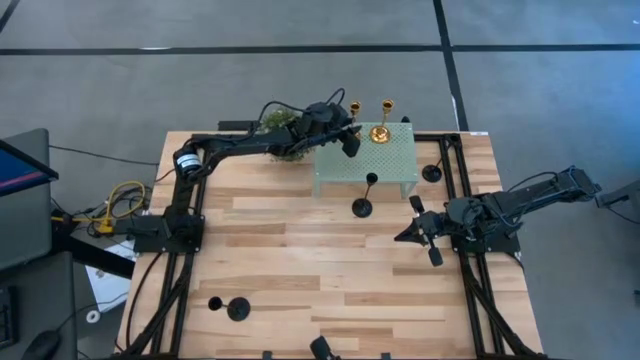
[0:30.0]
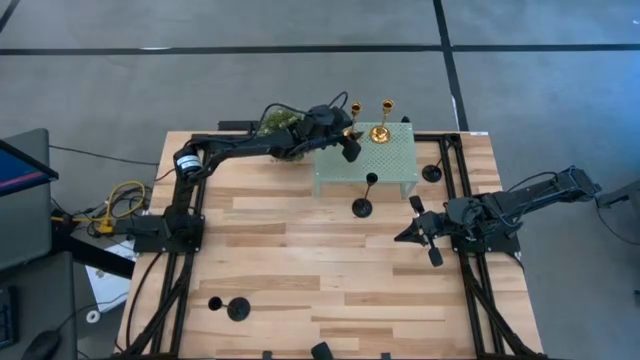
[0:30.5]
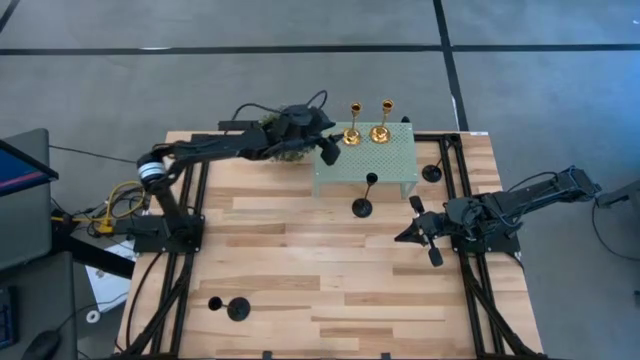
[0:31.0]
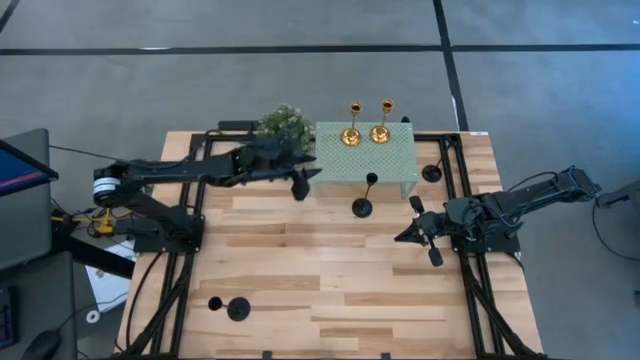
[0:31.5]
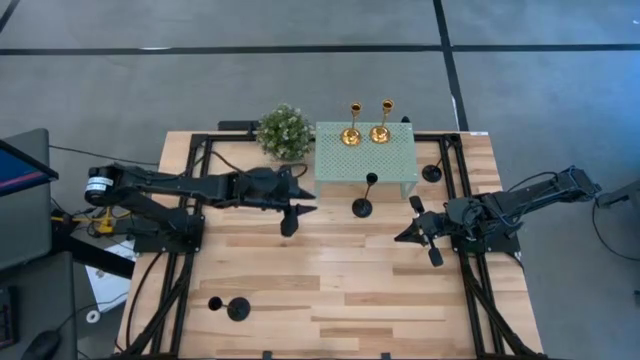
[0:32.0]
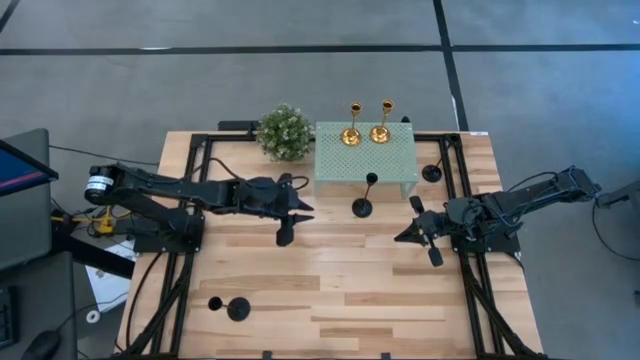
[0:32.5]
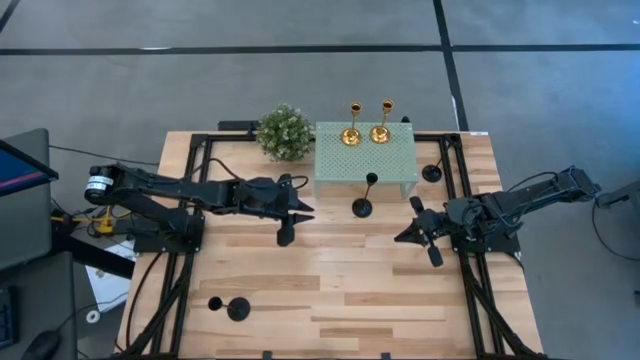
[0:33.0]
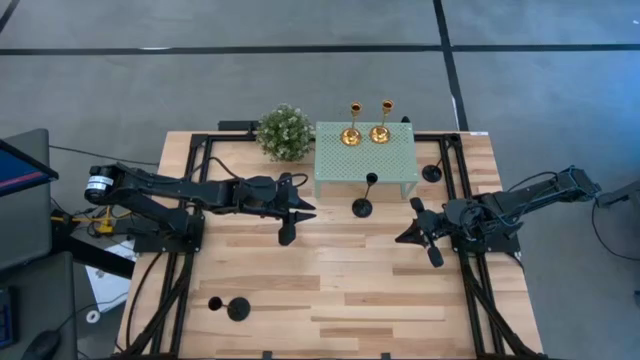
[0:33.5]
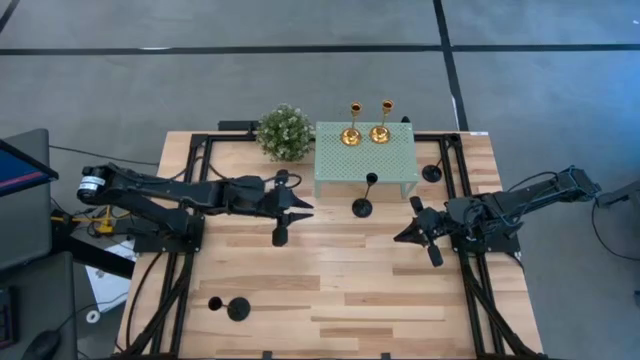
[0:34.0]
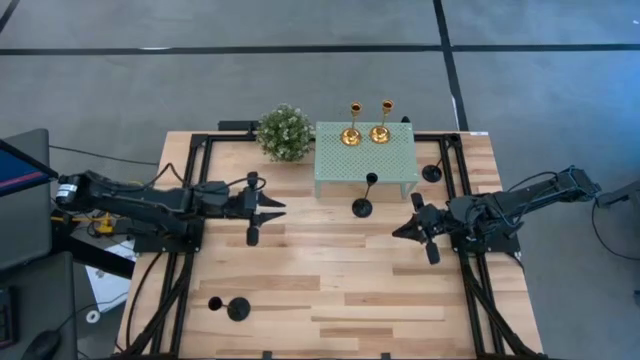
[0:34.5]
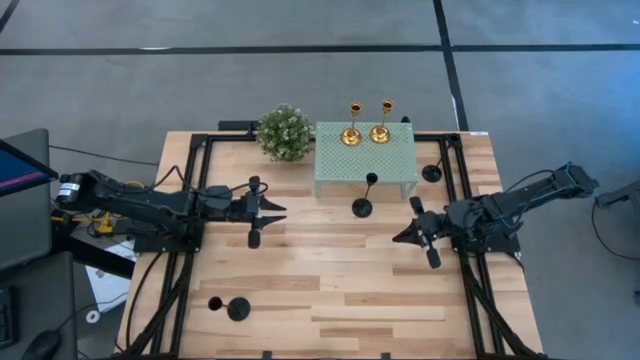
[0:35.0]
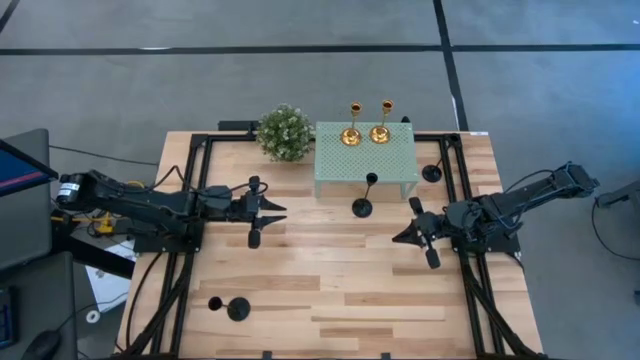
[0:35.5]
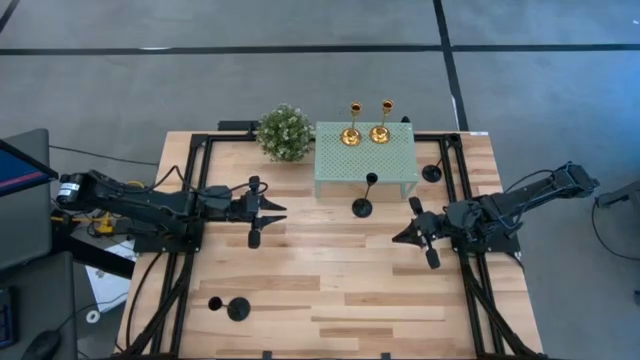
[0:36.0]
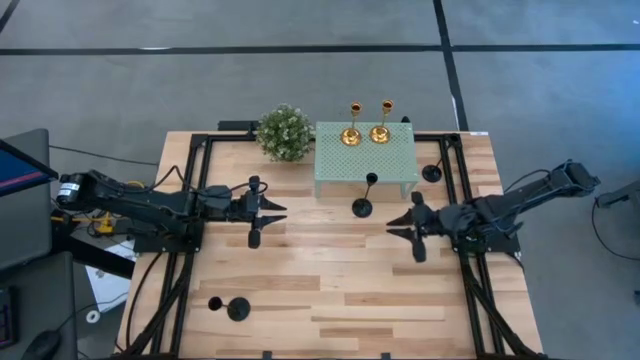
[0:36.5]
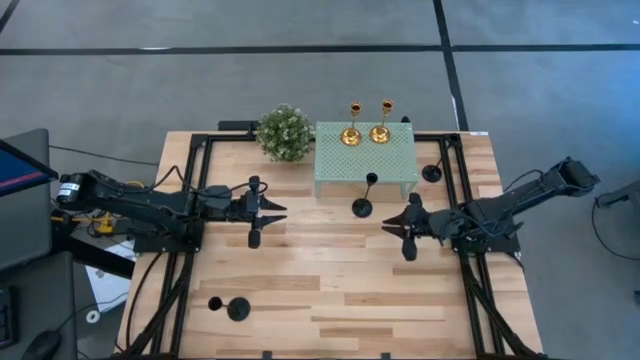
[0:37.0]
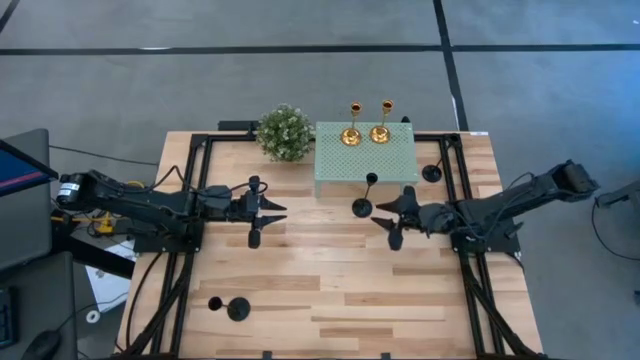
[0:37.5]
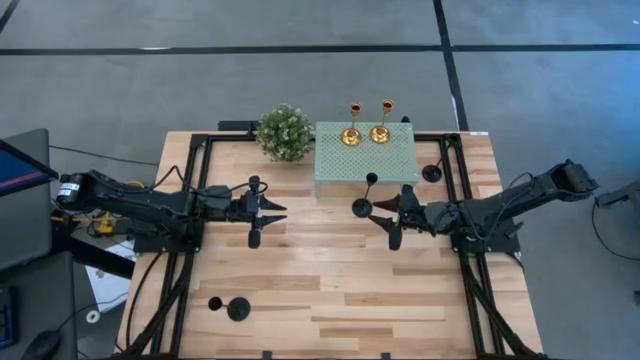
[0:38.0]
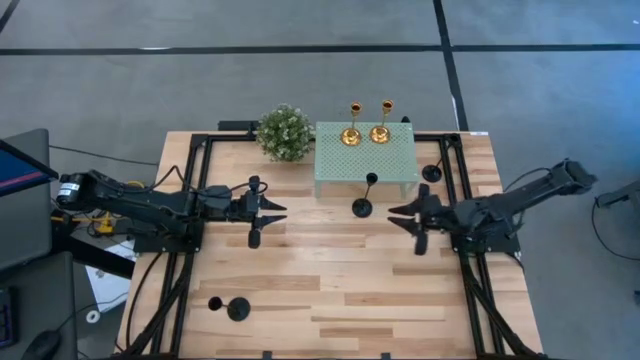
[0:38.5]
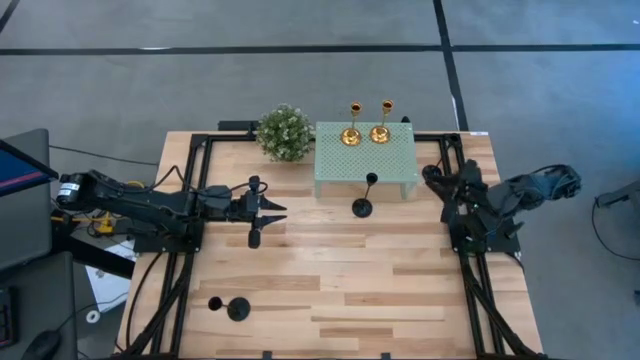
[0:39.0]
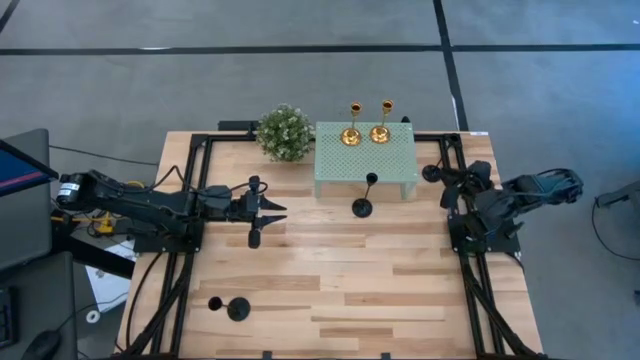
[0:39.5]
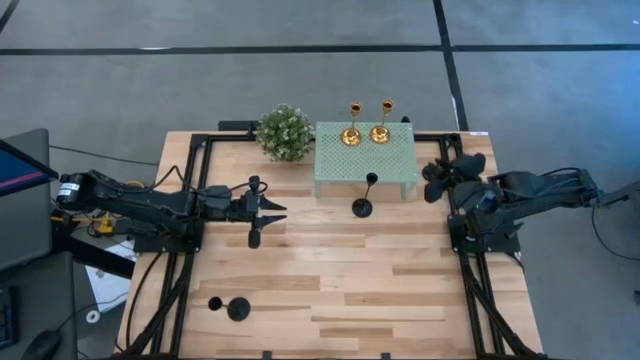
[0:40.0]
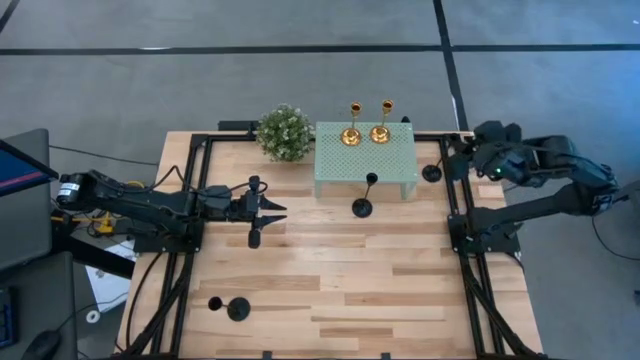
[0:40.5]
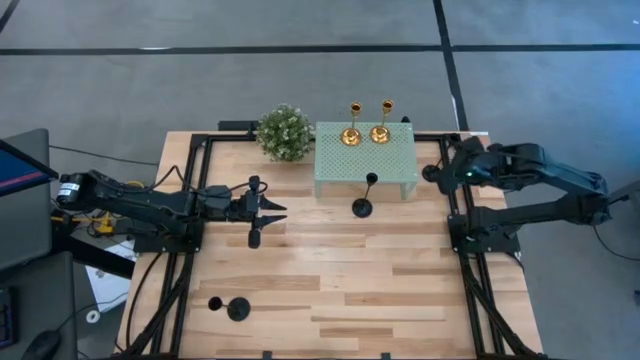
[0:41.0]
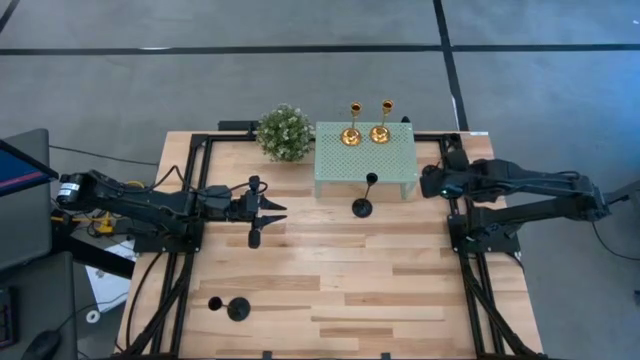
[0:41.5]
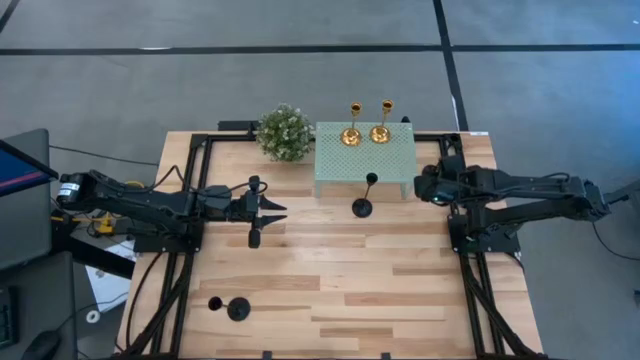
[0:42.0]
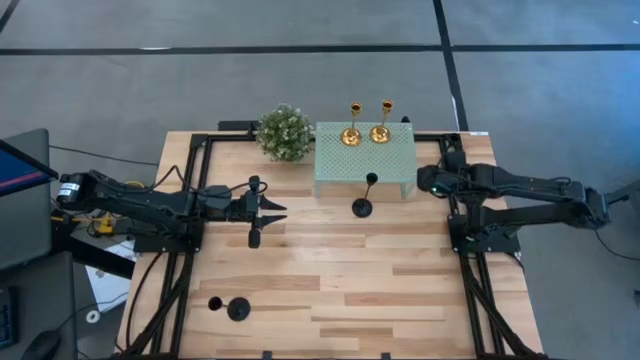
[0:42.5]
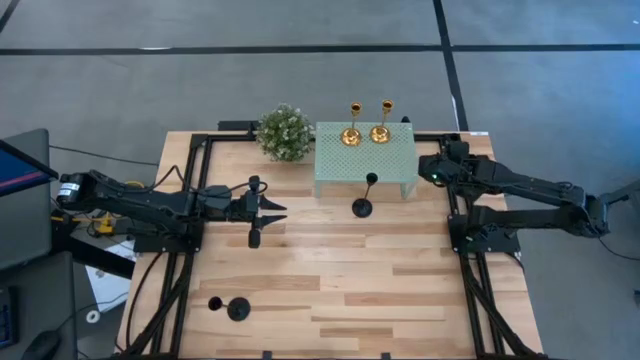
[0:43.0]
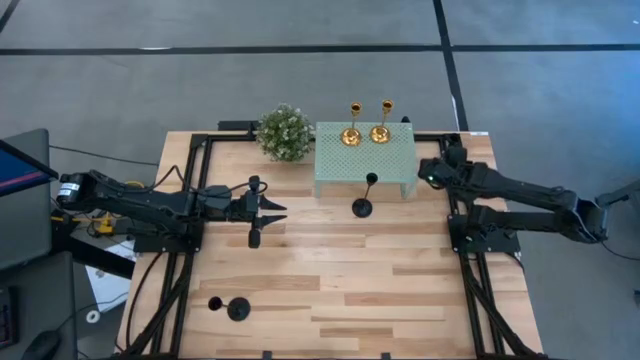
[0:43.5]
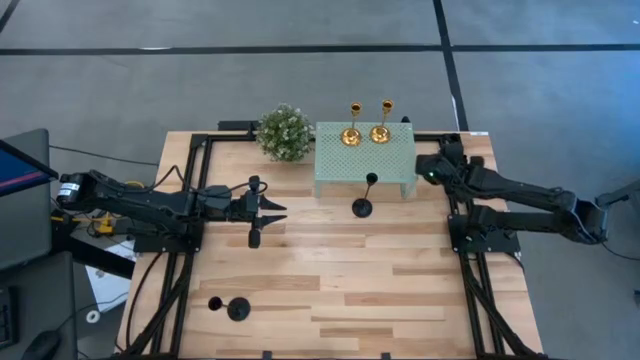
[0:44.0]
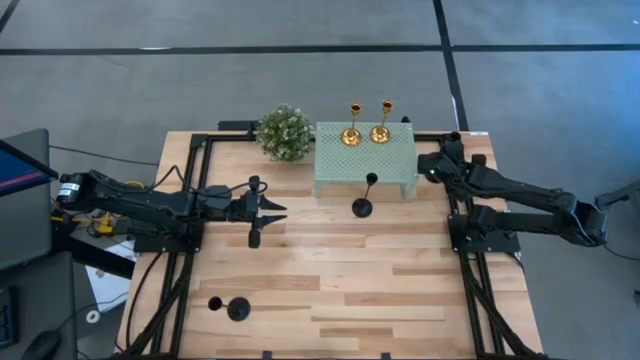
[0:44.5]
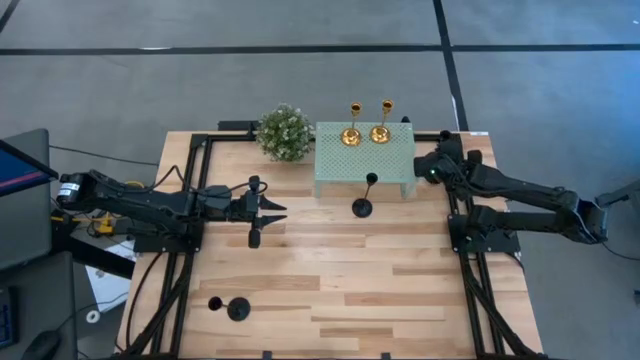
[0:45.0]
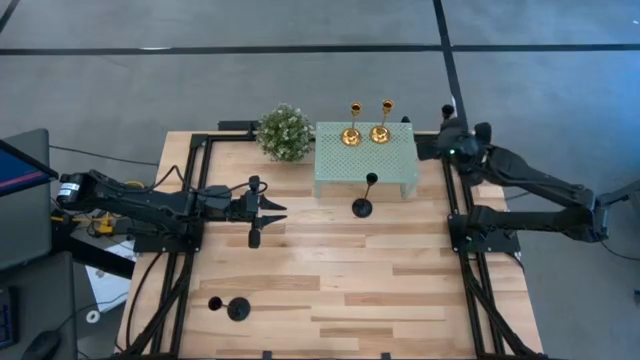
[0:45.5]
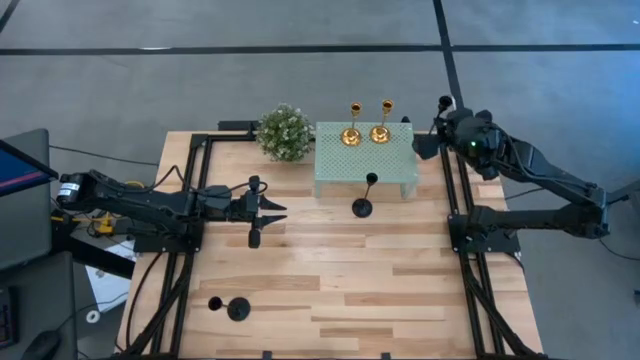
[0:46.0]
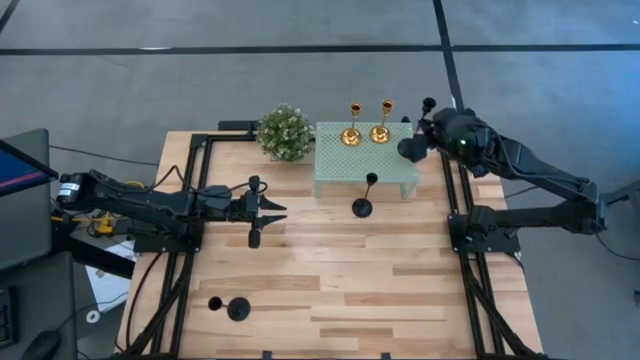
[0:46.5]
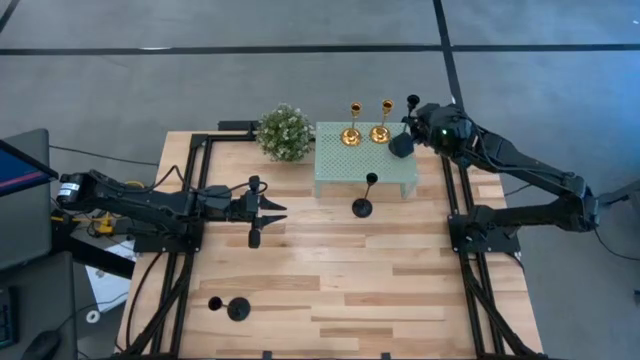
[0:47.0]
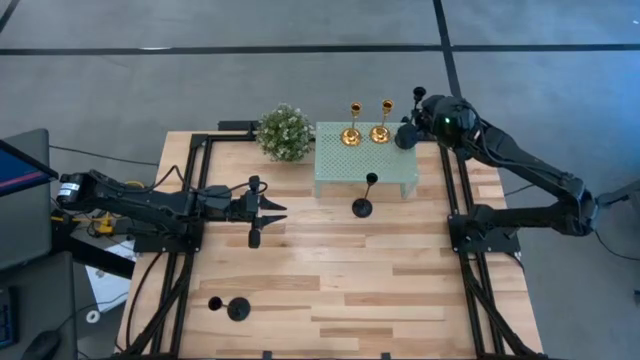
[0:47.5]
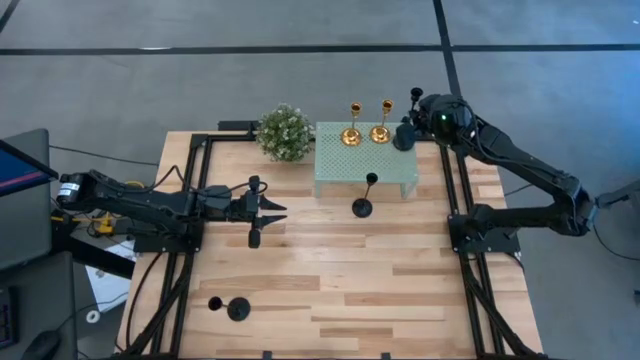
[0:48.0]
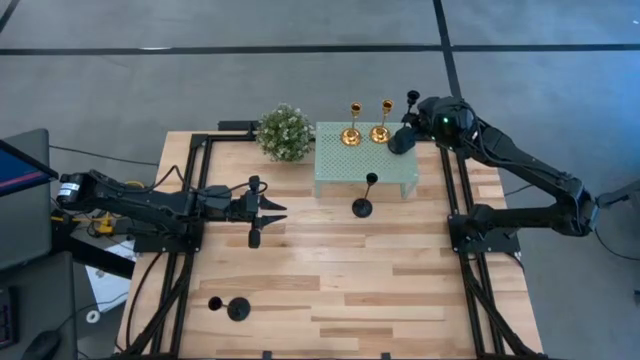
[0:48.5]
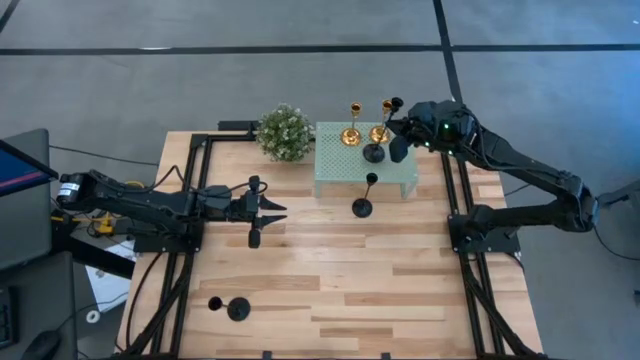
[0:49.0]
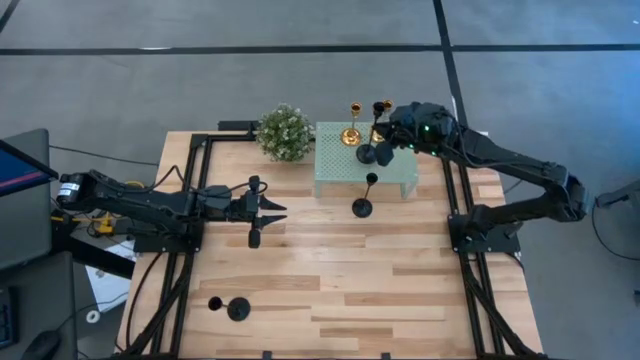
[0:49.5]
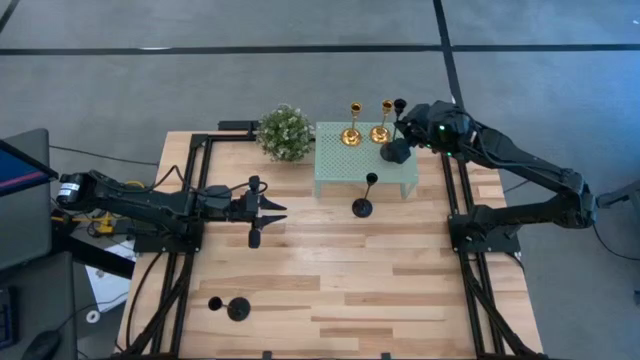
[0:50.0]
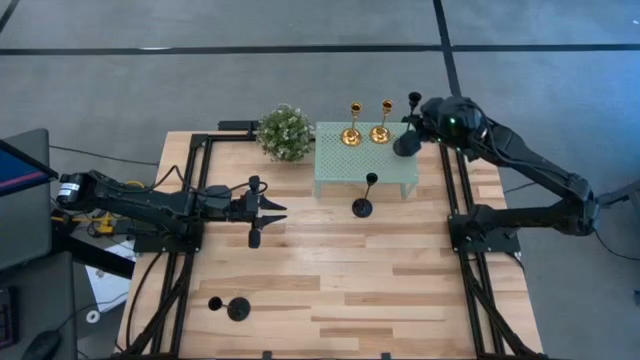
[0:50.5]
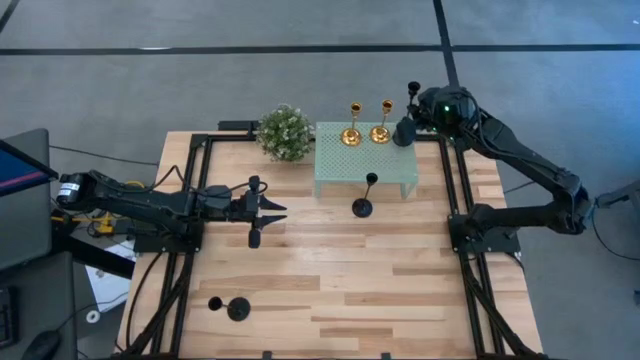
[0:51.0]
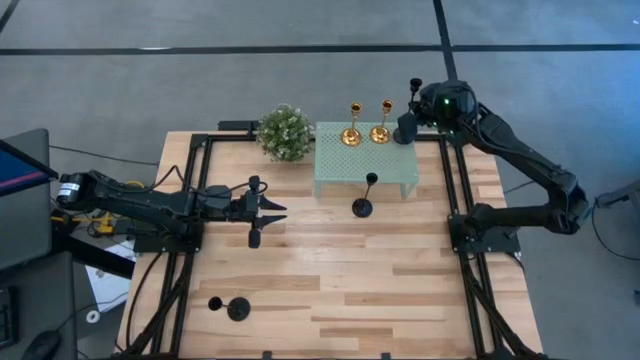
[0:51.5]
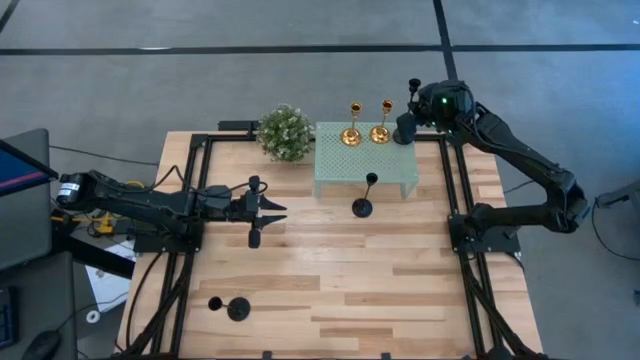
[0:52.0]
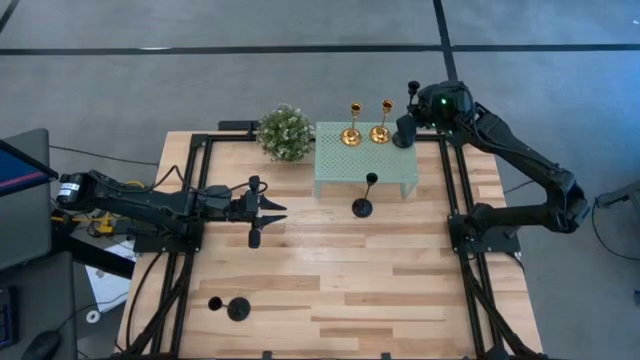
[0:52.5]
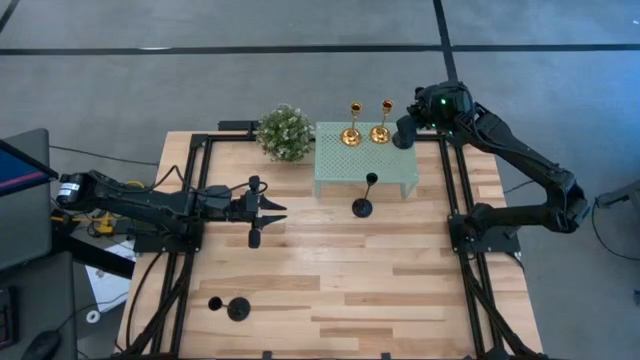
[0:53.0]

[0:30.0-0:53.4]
Task: Pick & Place candle stick holders
Put the top right black candle holder on the shelf
